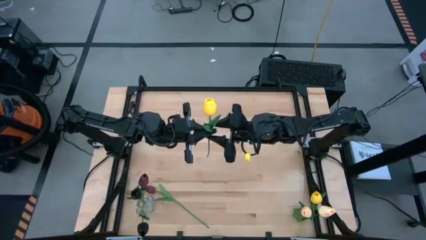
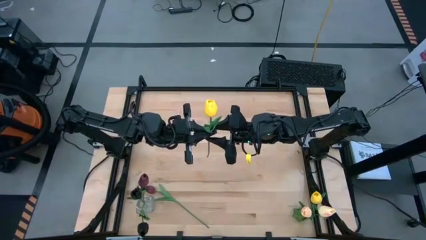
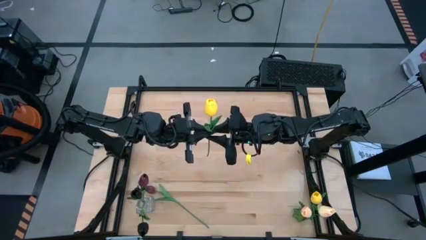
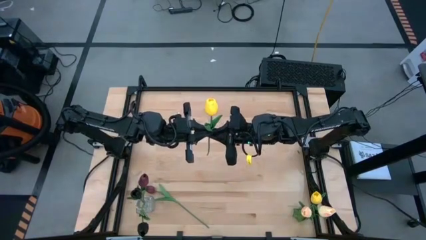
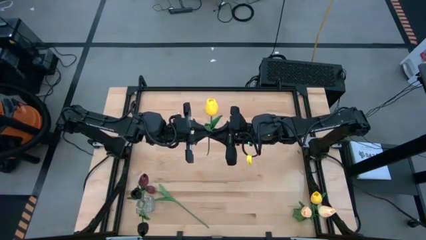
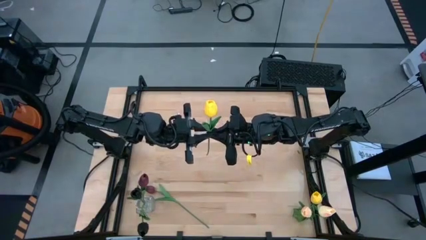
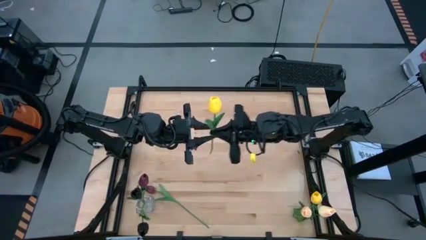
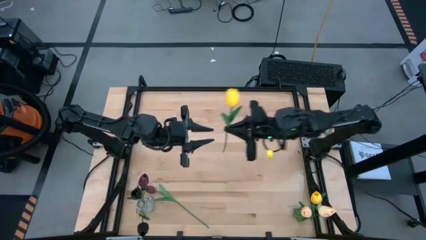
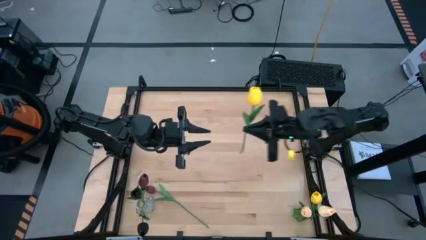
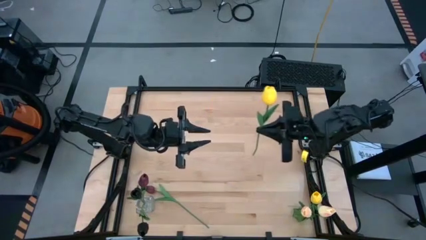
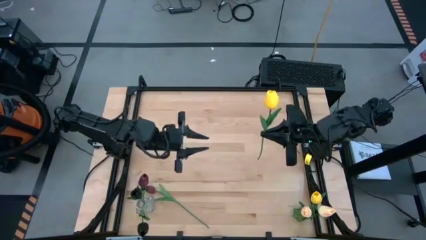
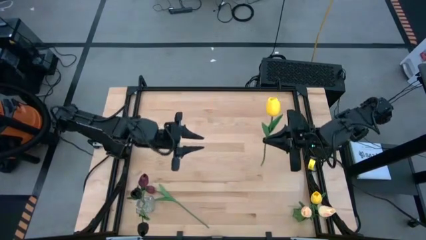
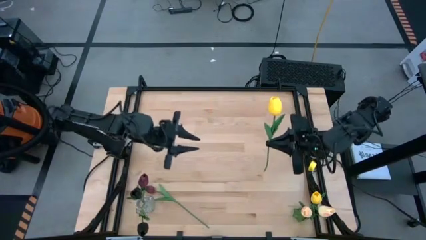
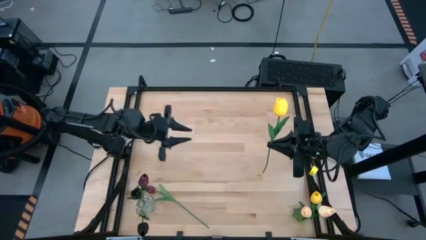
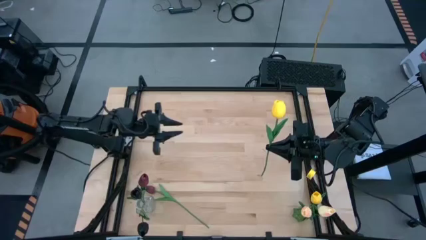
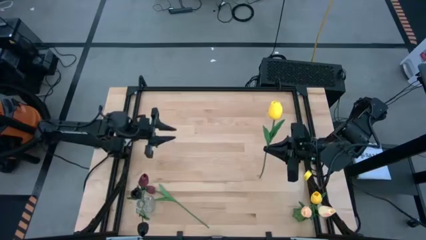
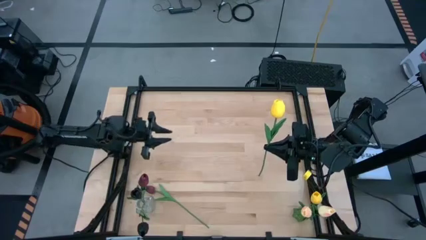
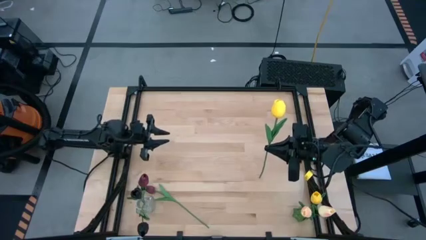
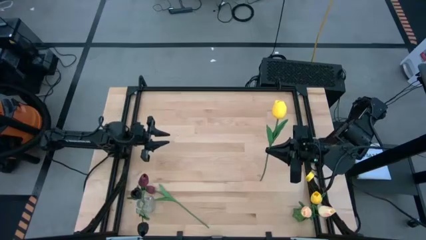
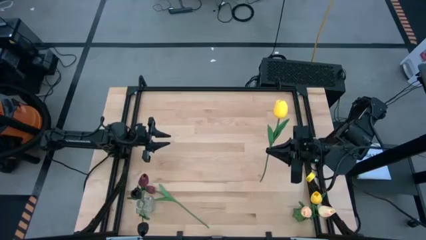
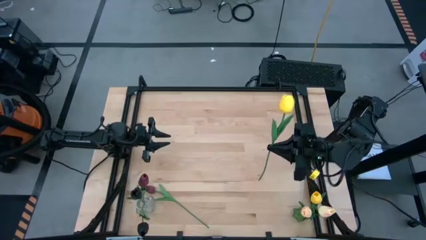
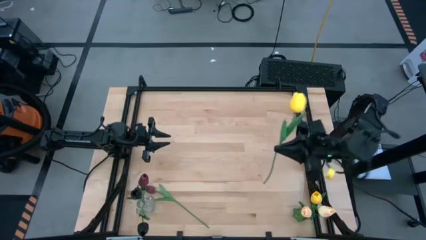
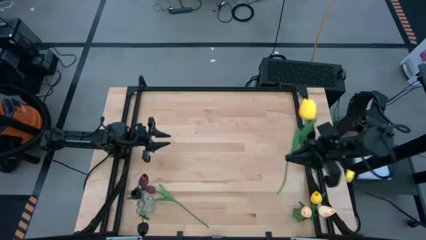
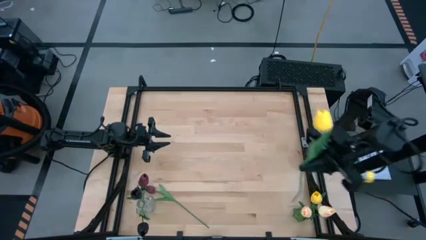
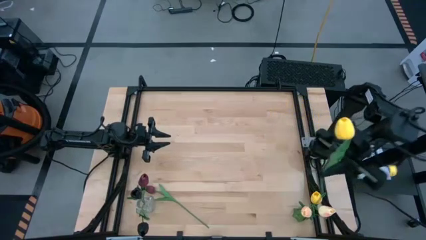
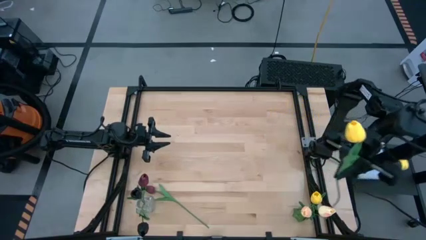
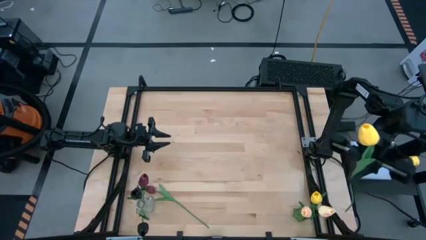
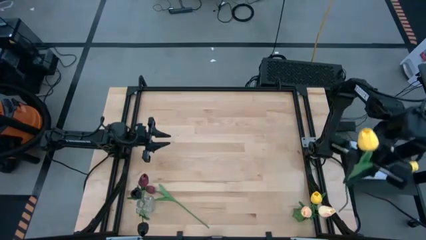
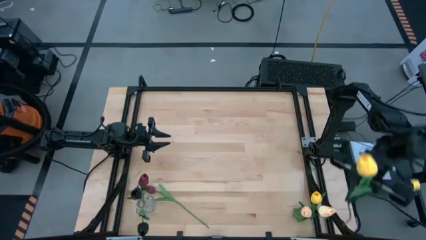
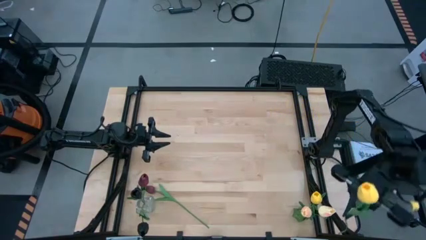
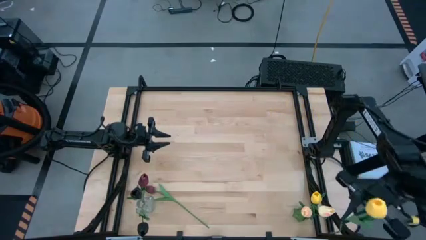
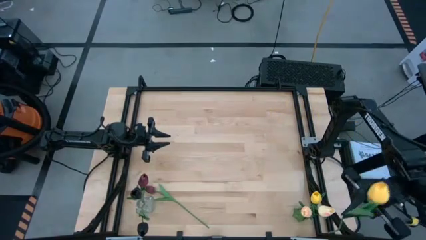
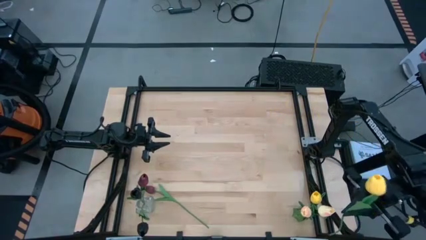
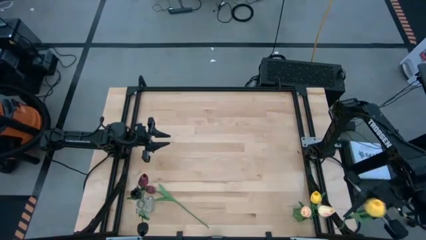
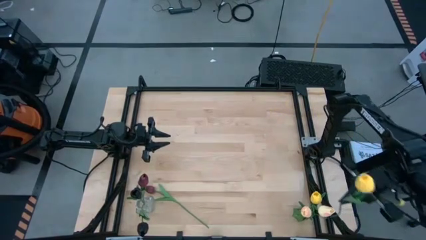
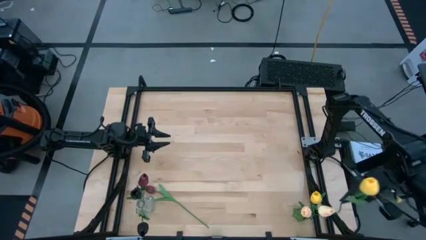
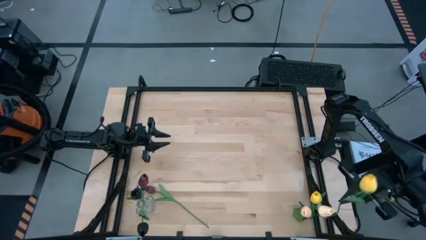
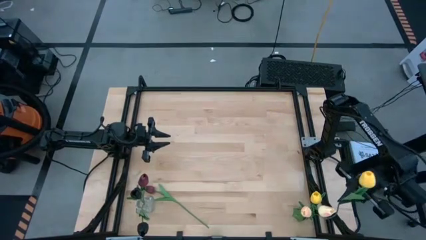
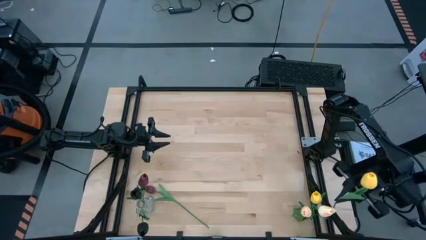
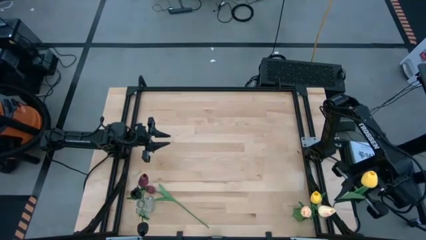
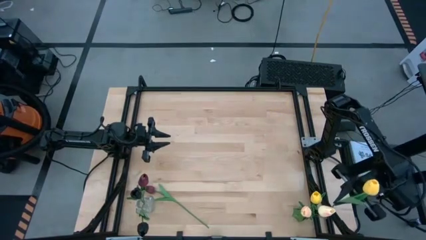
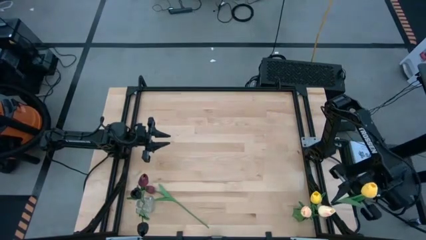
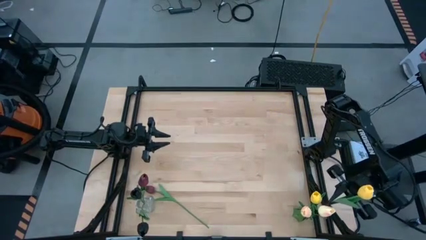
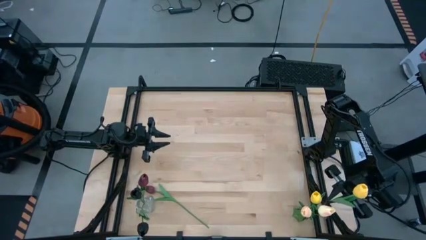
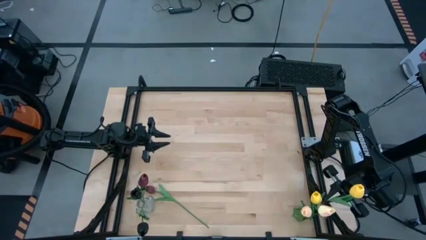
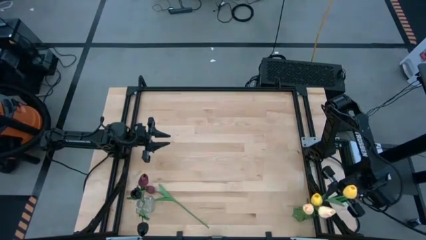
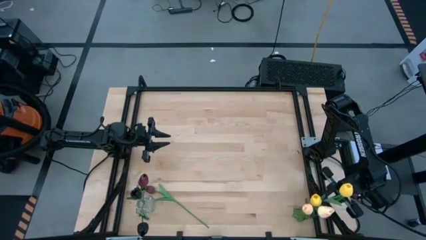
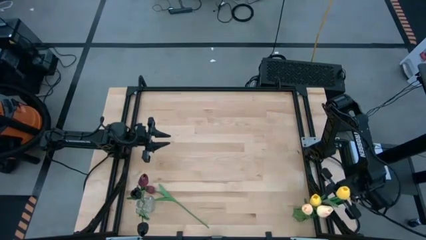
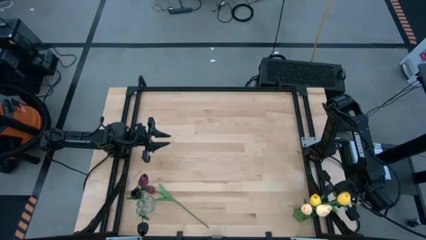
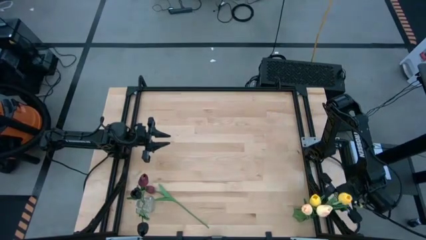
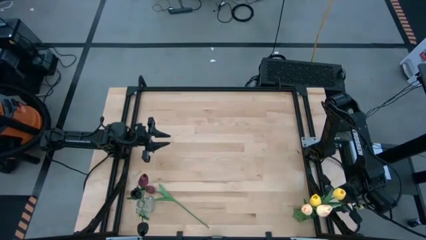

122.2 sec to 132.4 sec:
Task: Sort flowers into vase by color
Put the yellow tulip into the green vase

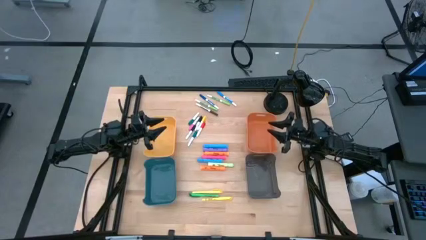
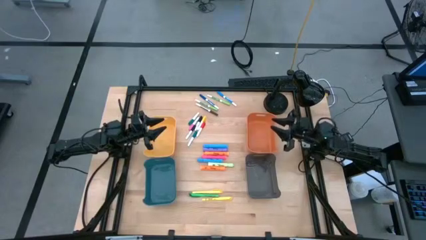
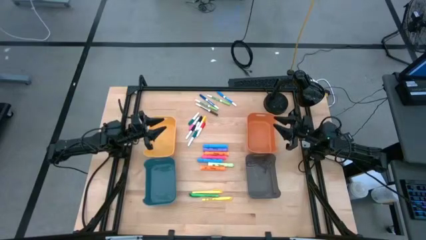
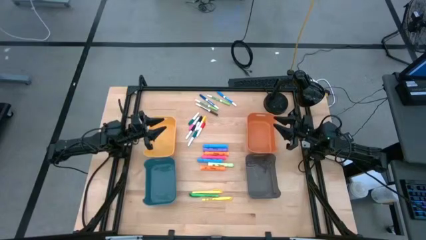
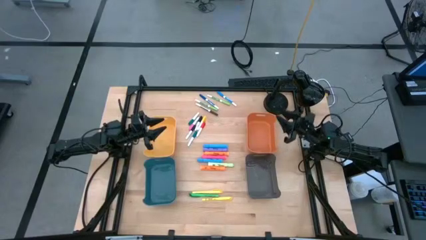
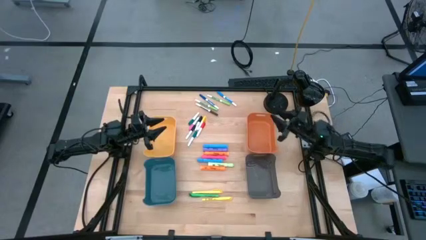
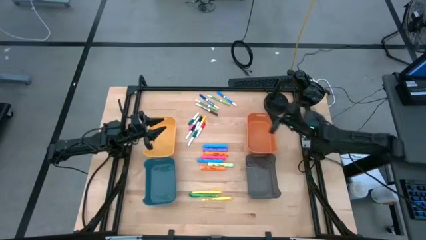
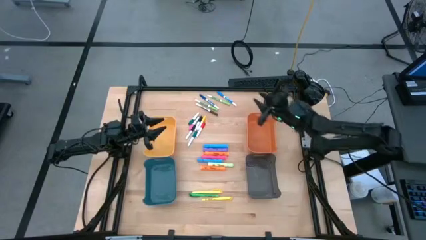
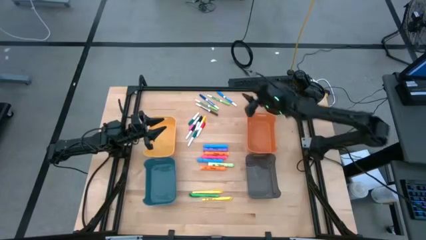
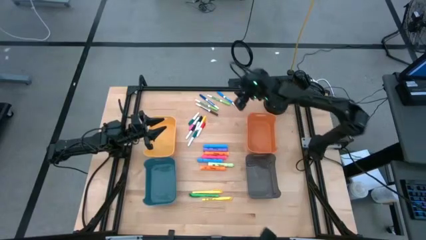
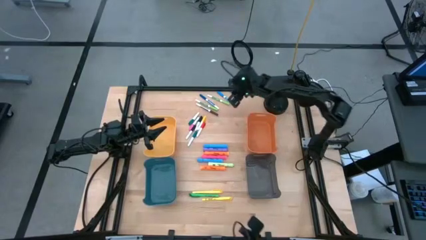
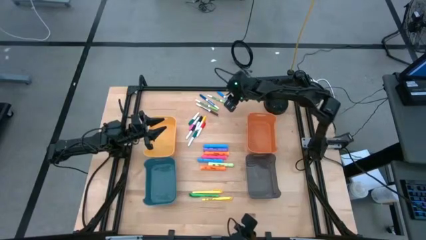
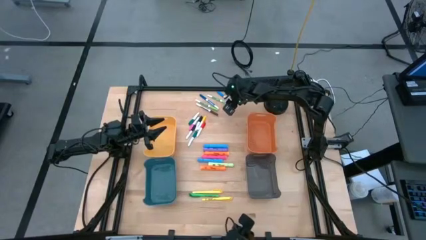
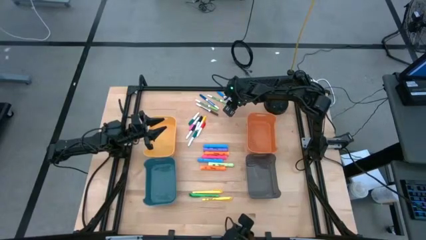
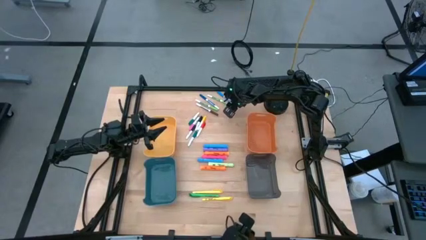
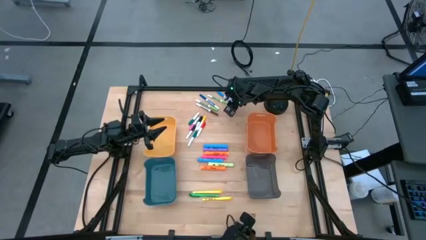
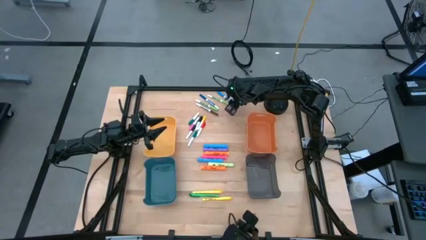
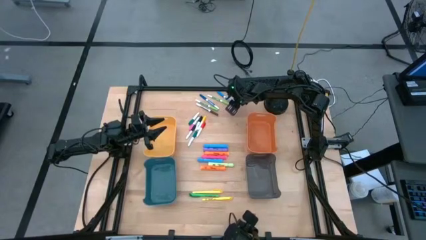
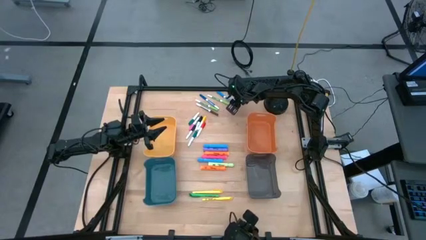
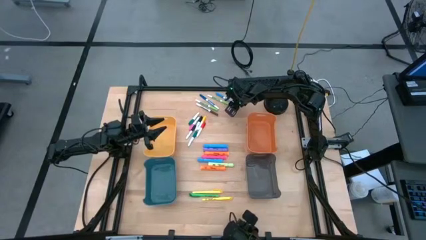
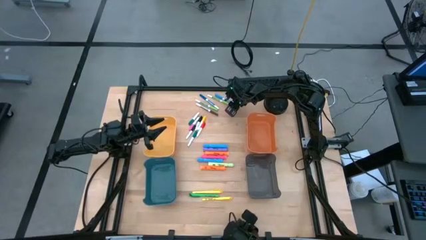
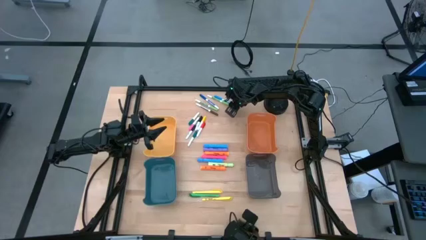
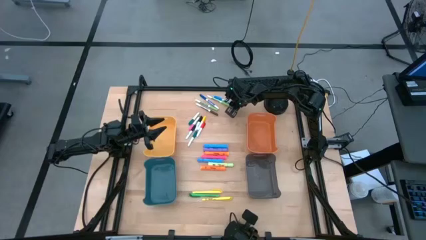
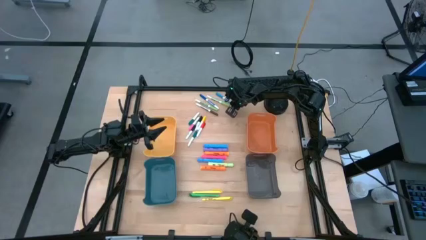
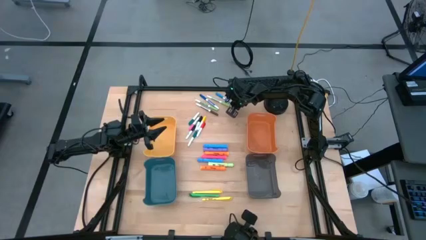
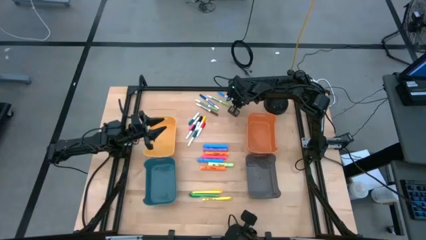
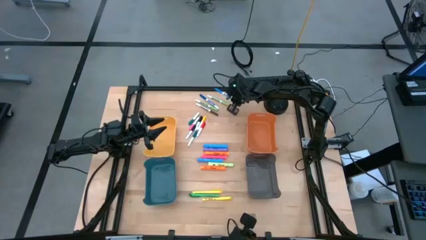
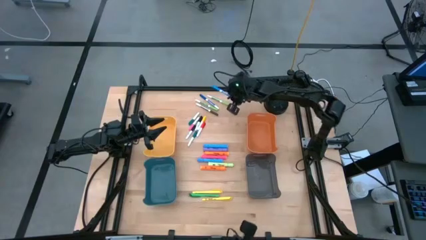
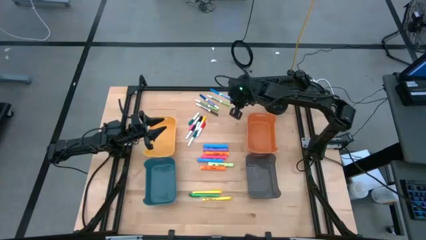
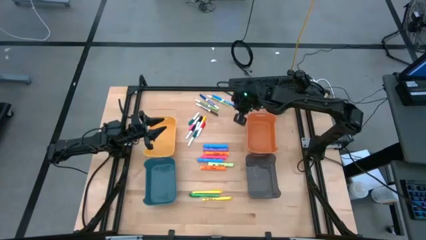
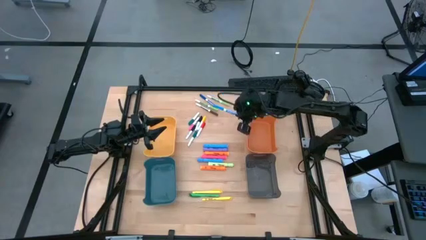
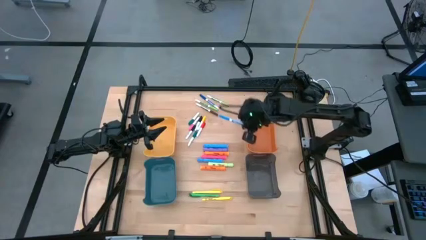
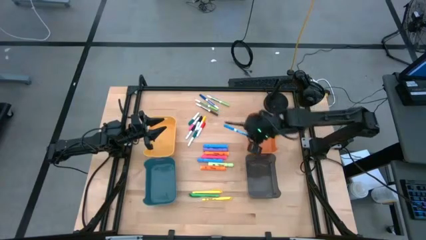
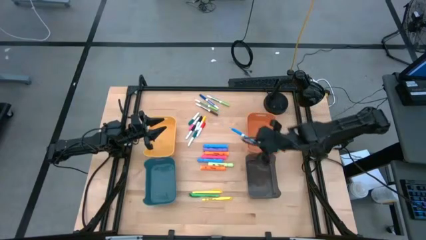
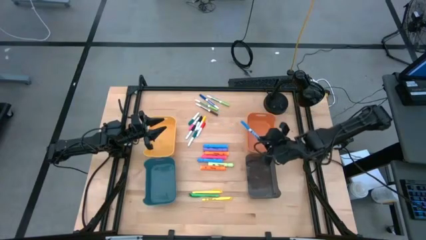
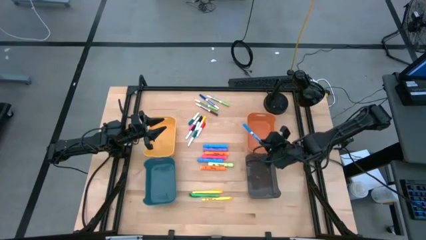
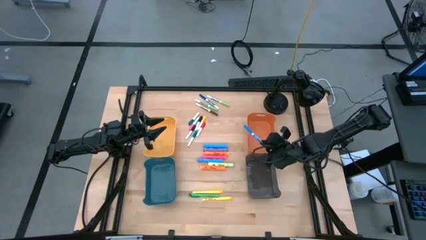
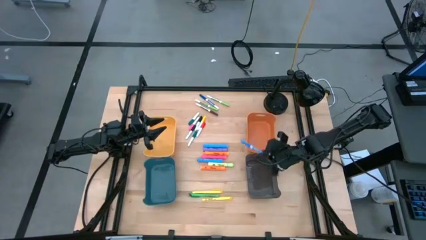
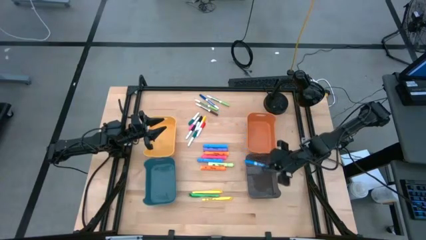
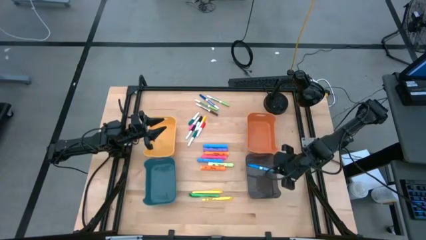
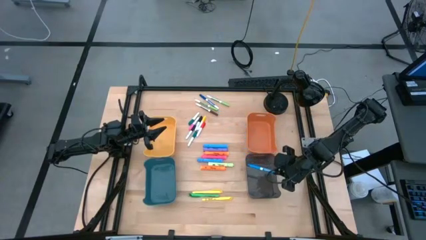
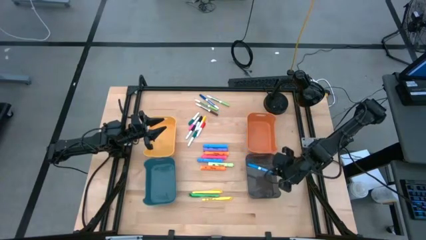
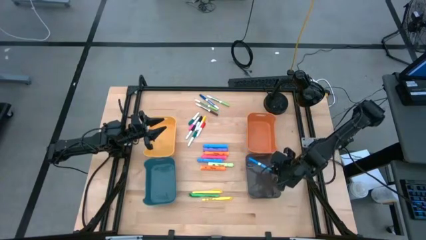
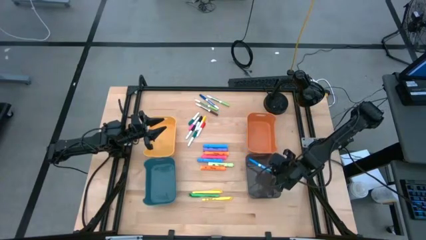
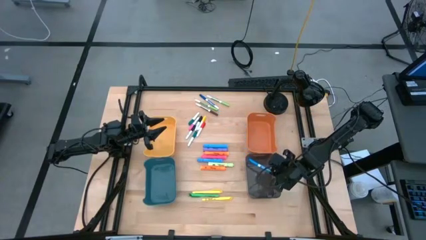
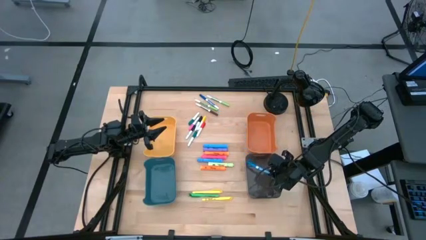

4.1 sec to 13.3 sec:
Task: Pick & Place Markers
Put the top blue dry erase marker into the black bin
